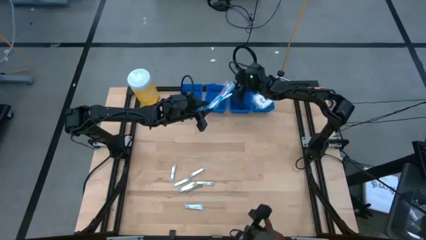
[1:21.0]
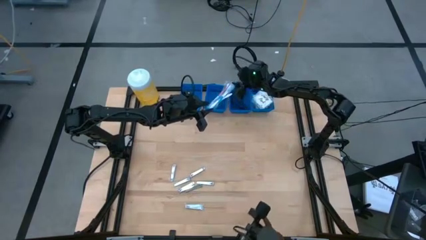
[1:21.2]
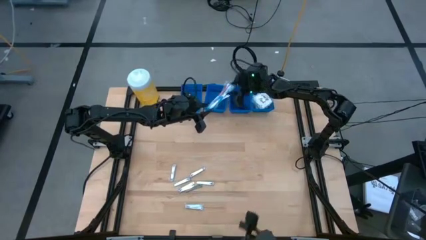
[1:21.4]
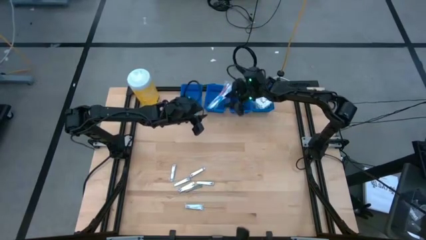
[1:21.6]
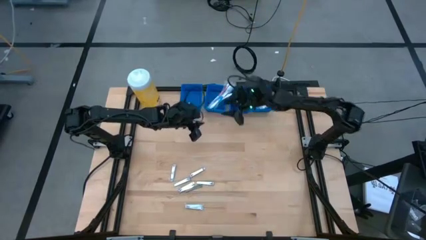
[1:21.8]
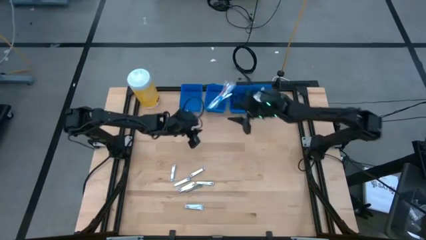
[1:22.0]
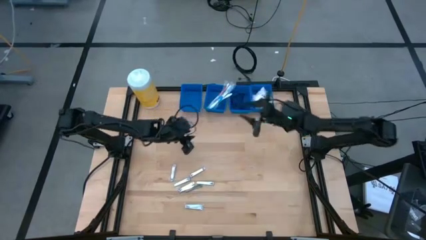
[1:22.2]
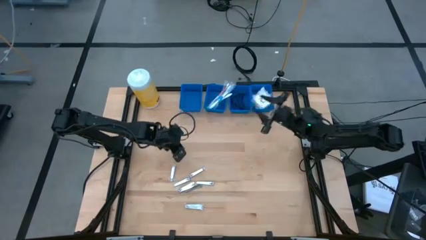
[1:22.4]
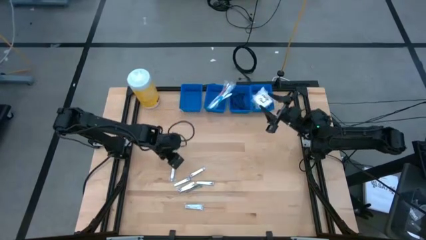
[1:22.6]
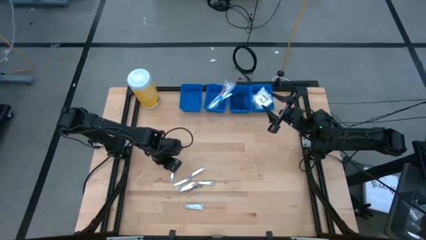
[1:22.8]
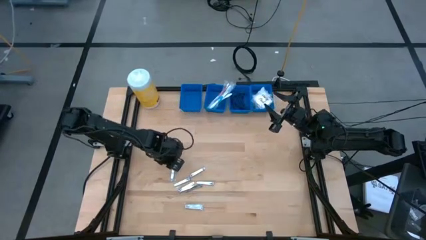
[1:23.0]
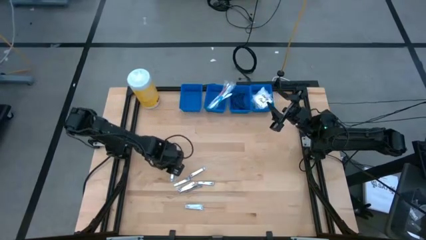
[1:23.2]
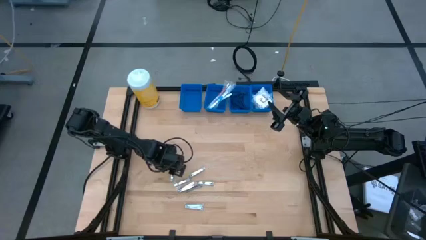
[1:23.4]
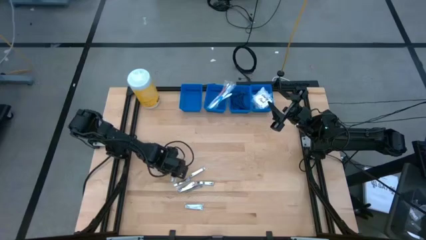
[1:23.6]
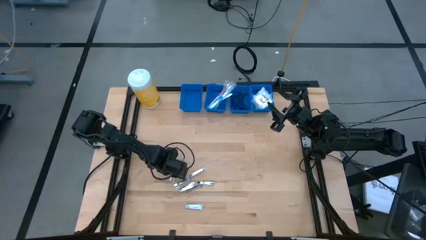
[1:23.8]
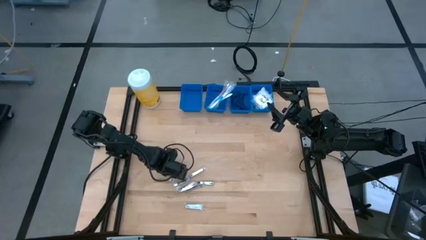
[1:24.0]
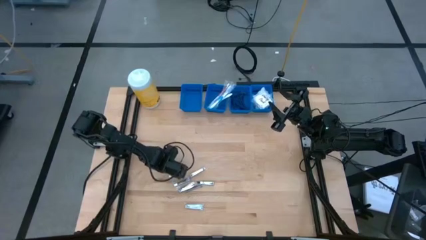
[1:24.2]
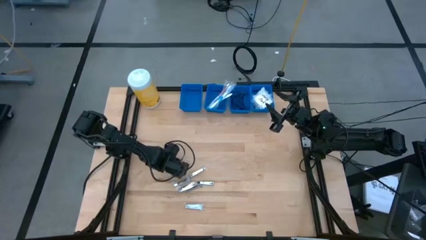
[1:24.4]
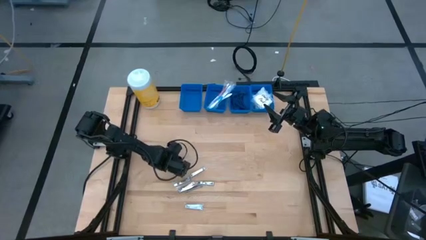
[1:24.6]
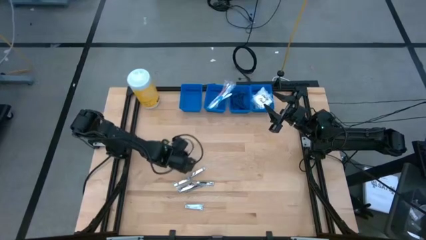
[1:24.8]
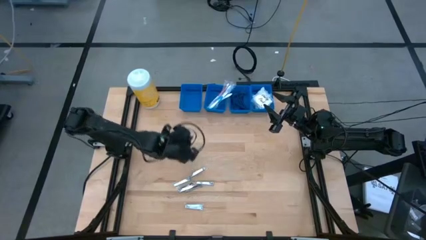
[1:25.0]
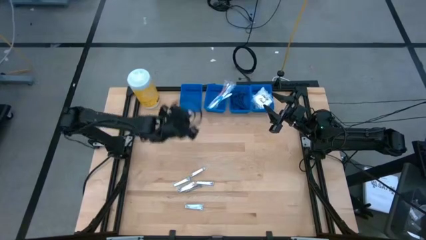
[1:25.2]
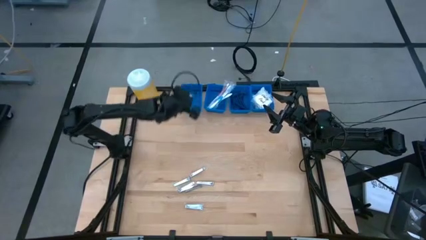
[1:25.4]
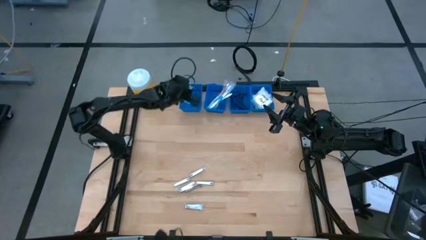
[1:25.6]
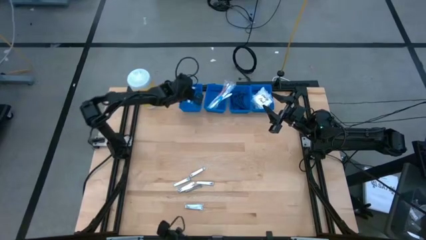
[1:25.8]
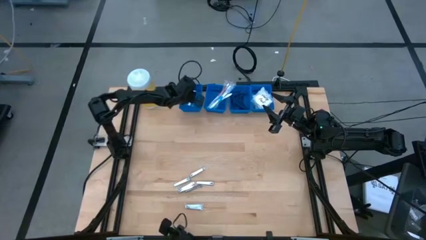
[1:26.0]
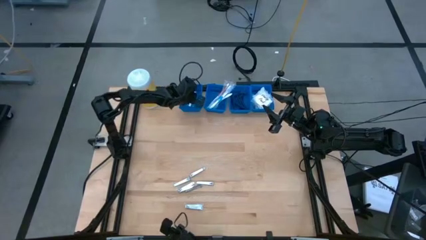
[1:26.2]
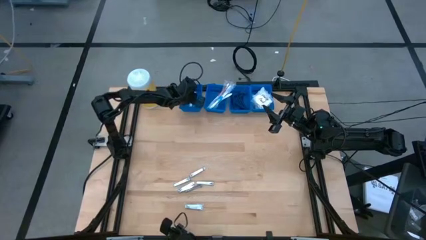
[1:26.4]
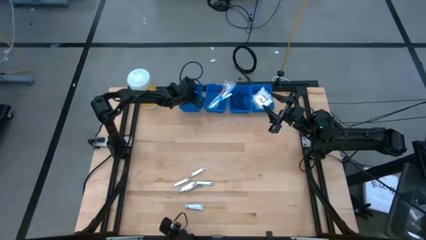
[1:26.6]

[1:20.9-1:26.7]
Task: Pick & Place Travel size toiletries
Put the silver nail cutter into the left blue basket

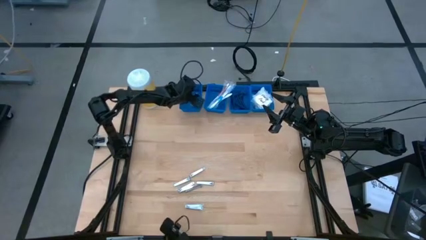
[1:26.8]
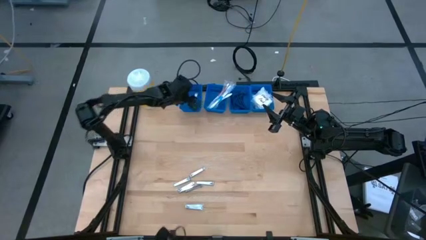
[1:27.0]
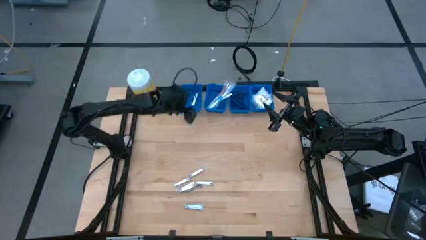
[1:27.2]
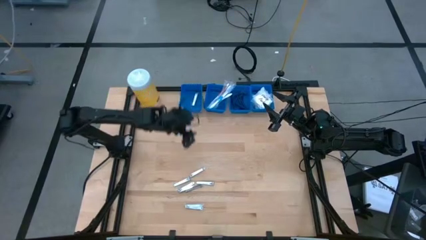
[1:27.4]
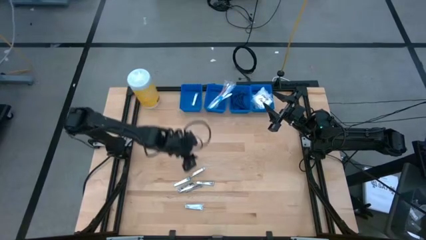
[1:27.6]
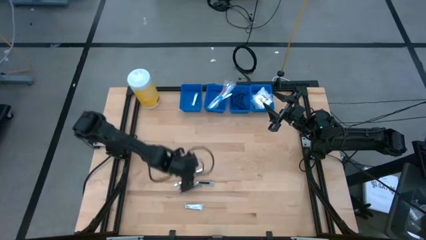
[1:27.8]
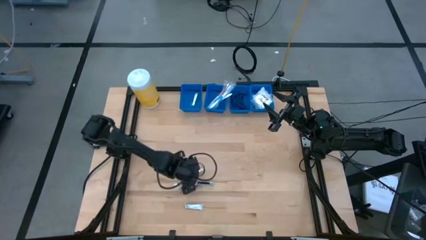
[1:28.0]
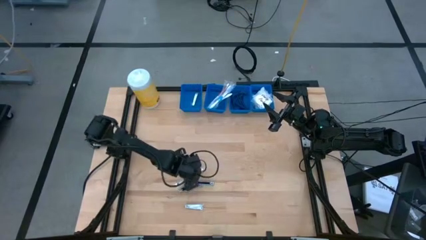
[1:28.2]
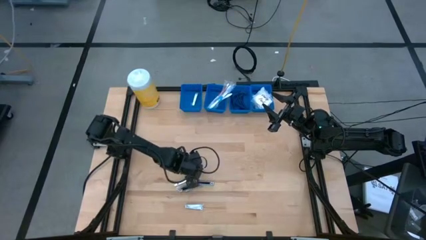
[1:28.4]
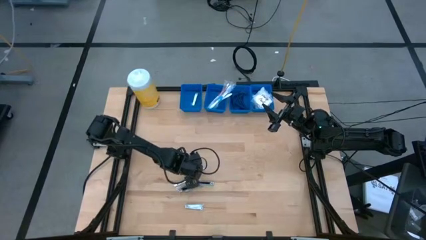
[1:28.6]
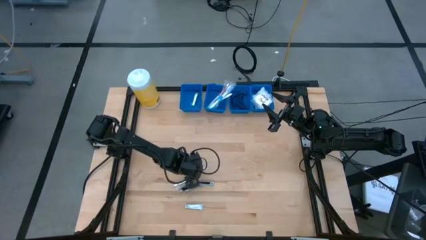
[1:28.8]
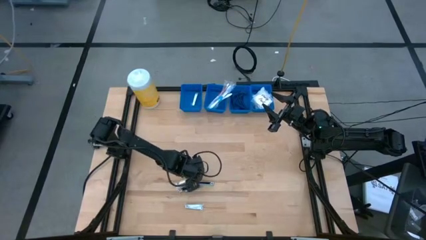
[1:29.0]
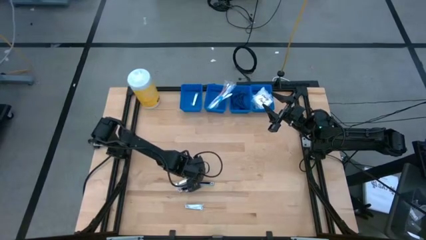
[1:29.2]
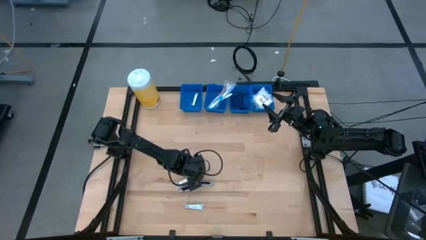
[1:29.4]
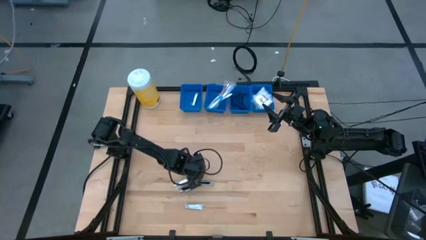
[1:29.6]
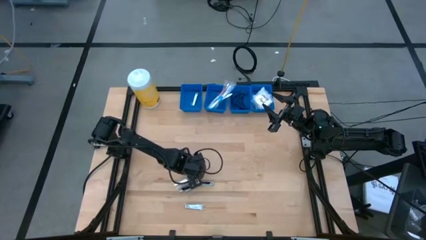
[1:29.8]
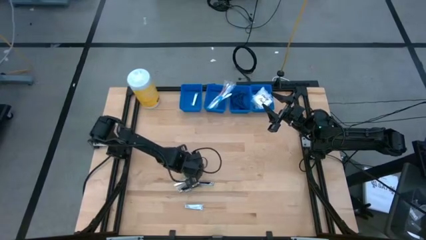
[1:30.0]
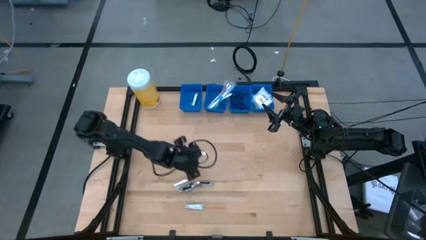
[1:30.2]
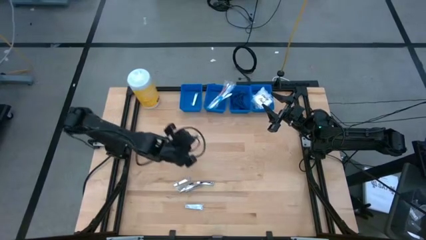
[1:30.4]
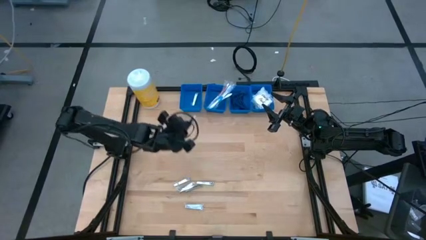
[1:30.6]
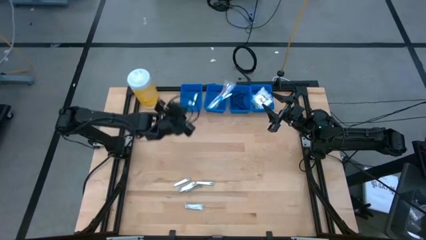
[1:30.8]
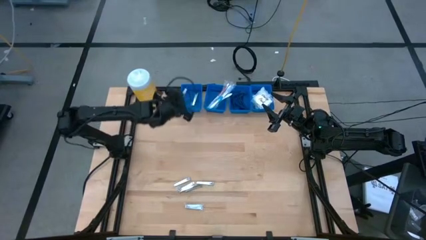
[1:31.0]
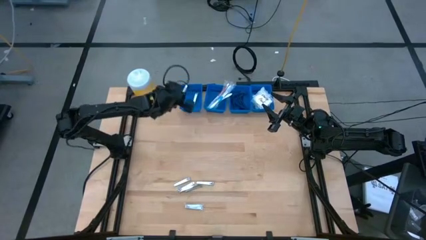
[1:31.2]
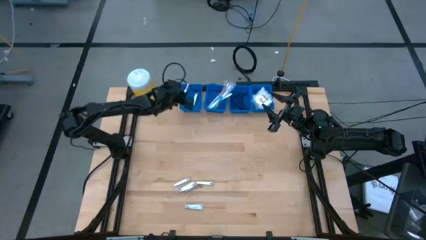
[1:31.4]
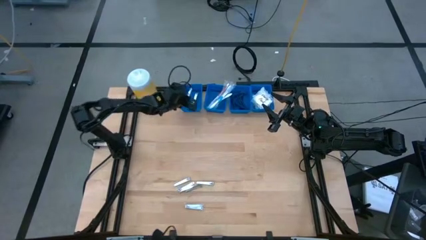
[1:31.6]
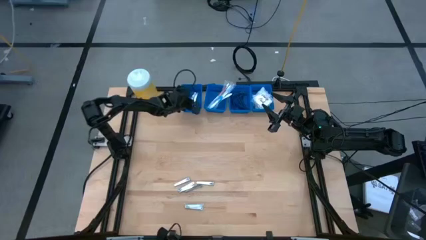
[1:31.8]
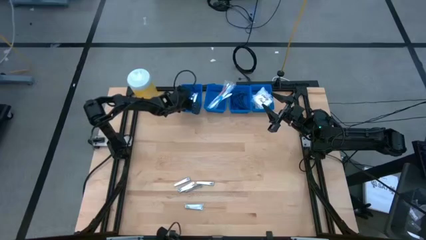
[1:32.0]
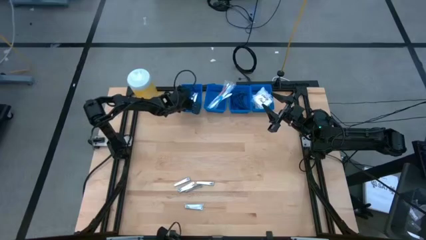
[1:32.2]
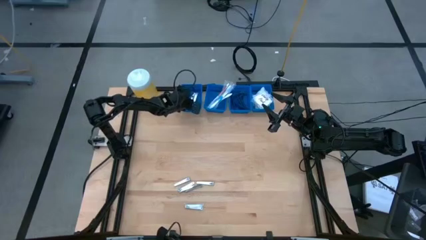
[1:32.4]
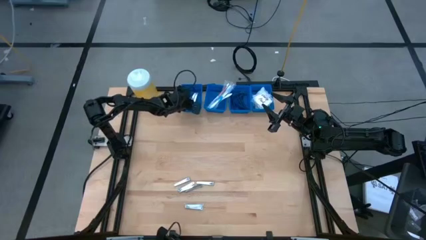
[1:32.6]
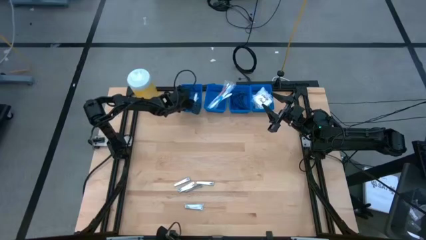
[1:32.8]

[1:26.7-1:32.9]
Put the silver nail cutter into the left blue basket

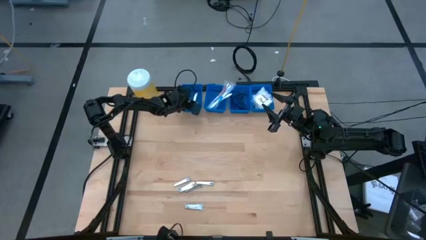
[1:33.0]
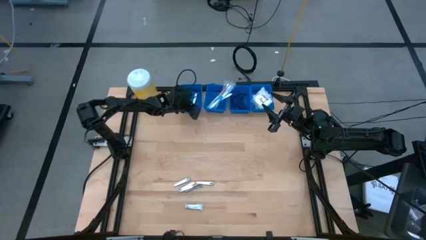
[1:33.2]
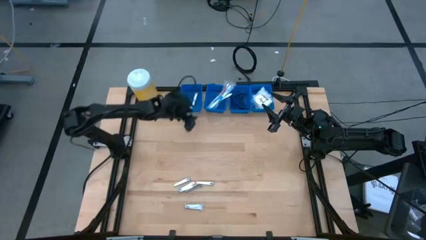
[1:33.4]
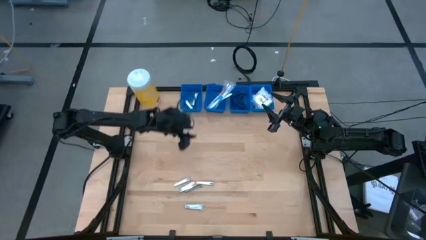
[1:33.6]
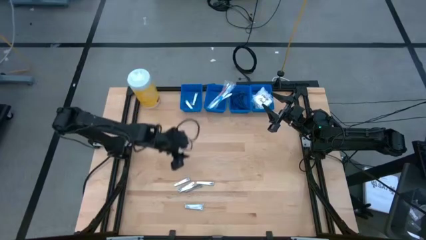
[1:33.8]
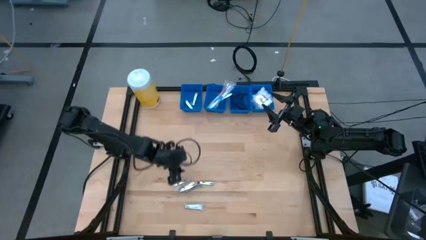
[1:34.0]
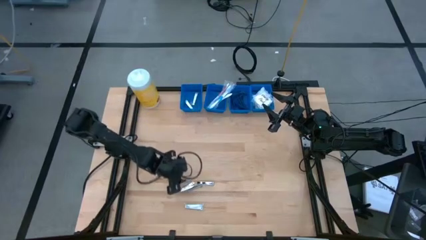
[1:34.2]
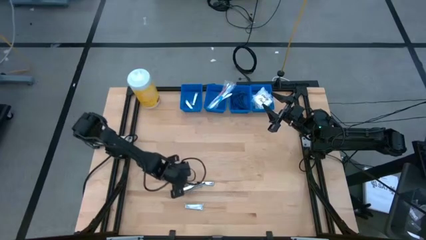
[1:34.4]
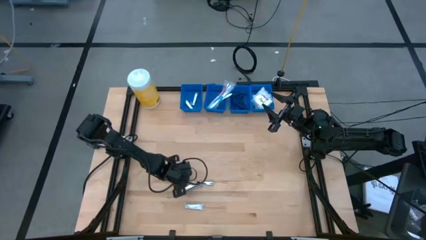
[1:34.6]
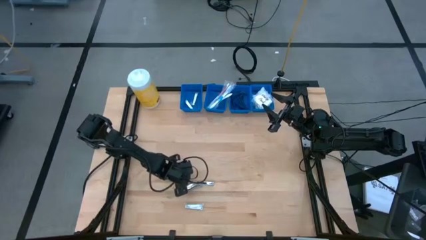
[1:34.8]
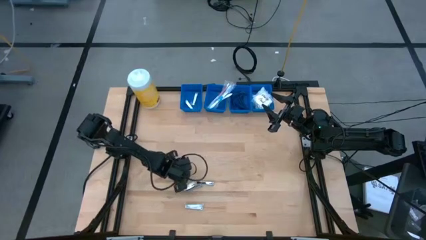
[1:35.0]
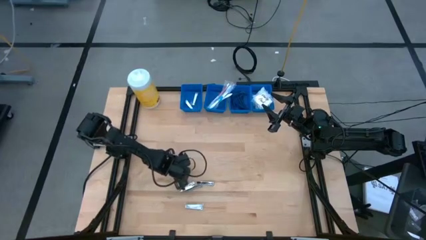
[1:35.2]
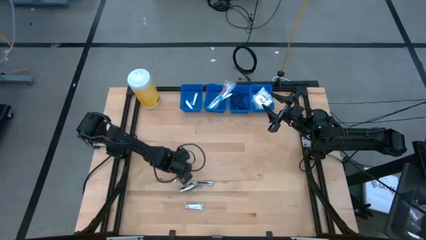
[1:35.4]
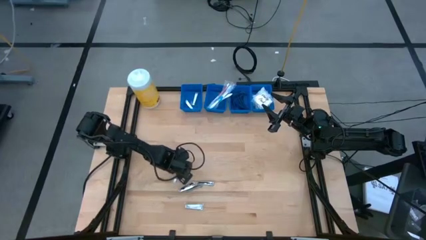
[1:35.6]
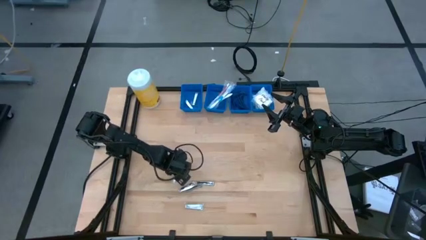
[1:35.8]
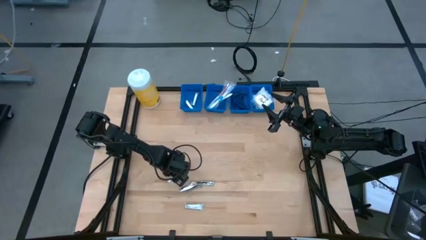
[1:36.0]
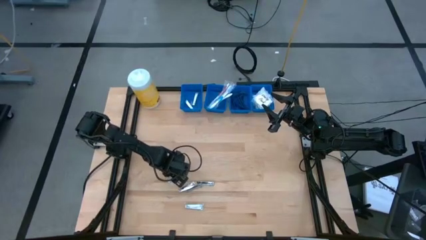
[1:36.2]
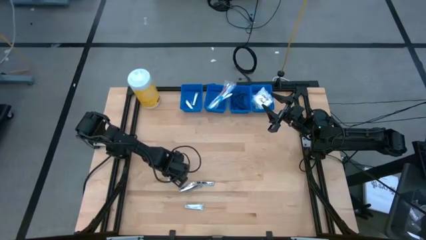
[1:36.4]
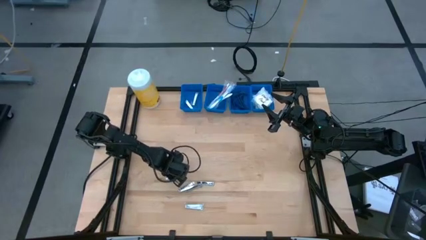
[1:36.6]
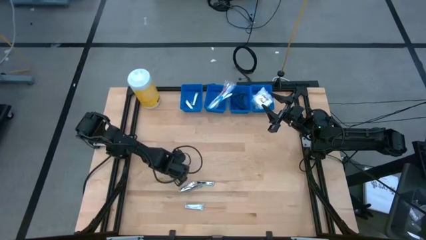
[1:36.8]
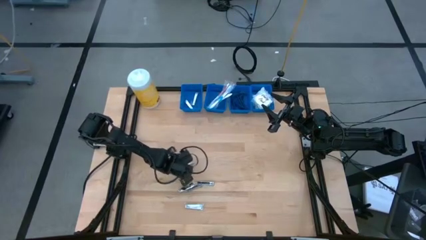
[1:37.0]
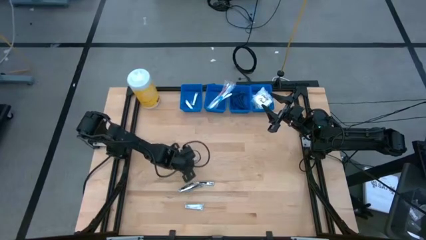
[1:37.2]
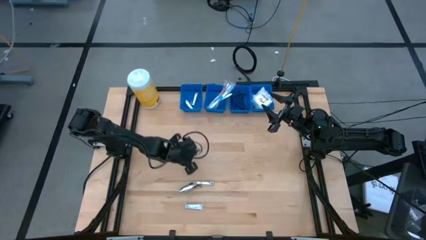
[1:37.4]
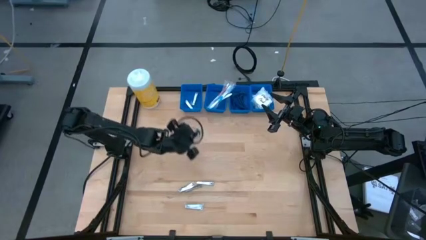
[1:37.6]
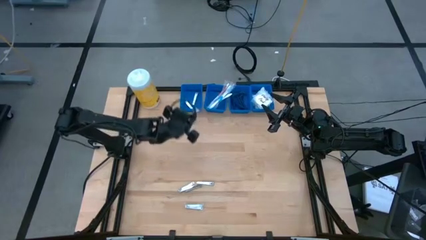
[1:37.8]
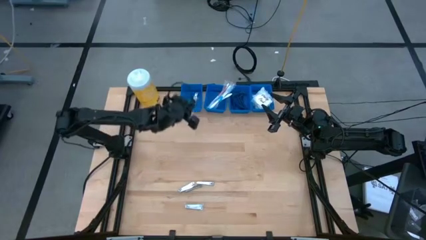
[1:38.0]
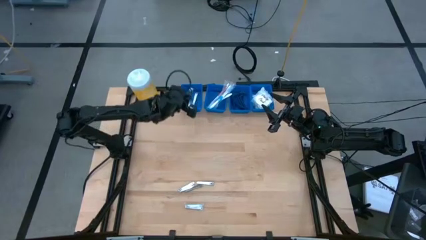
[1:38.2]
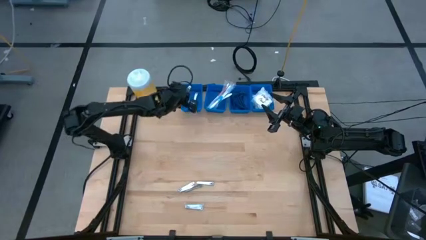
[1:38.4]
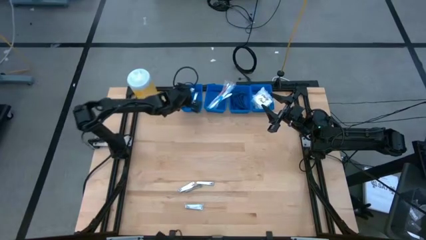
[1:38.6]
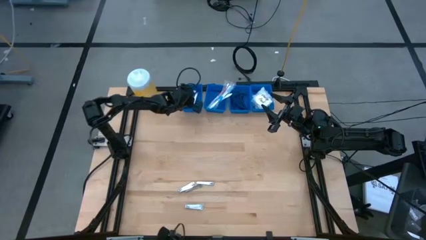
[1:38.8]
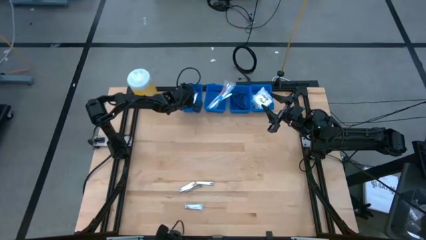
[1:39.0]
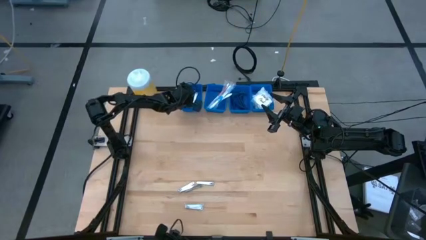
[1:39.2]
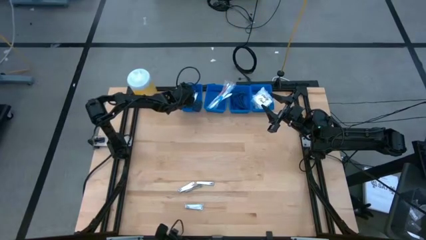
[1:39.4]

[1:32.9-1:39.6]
Put the silver nail cutter into the left blue basket
